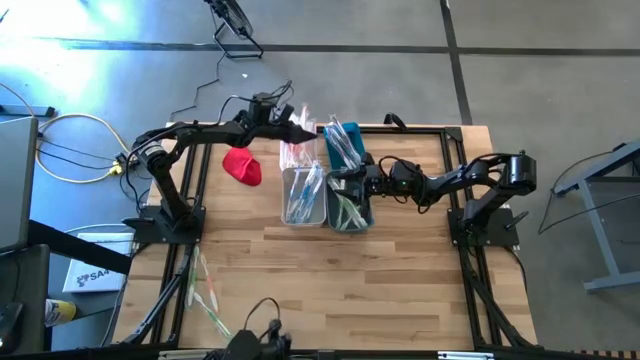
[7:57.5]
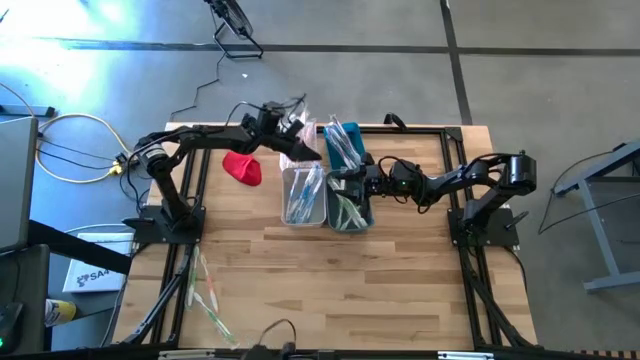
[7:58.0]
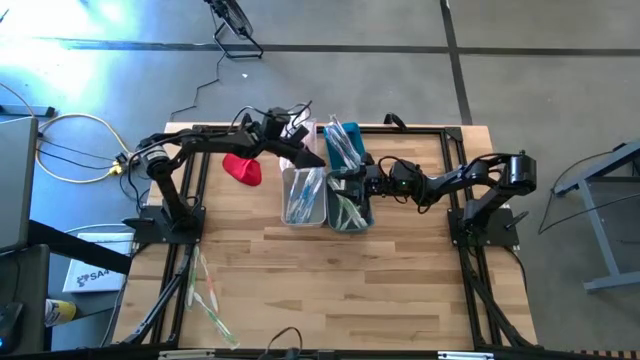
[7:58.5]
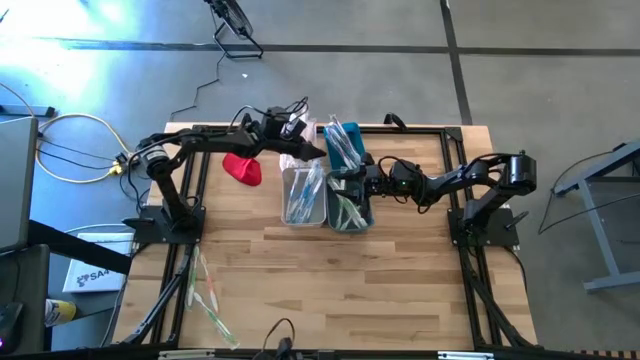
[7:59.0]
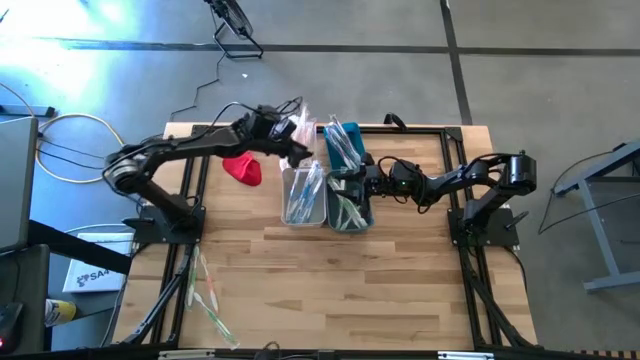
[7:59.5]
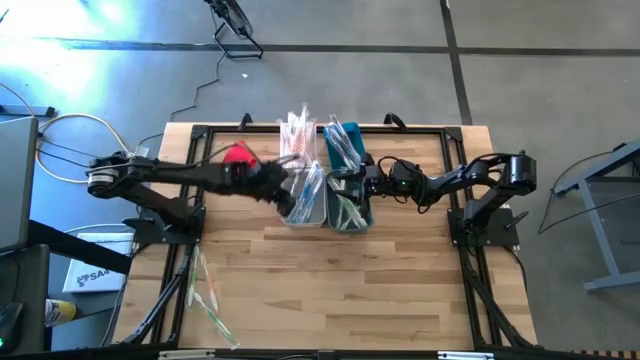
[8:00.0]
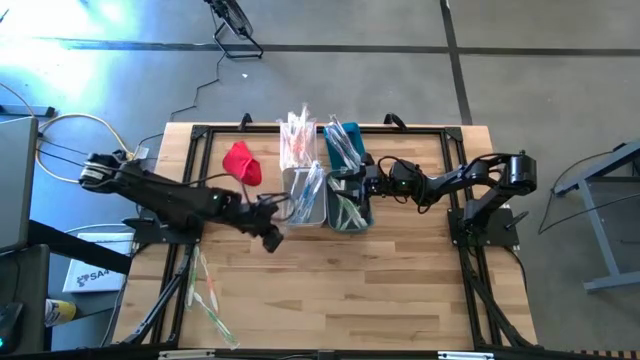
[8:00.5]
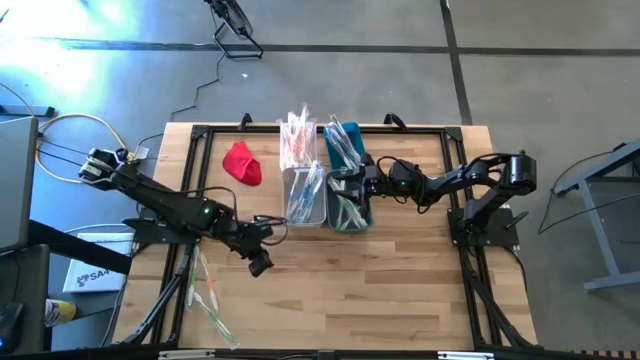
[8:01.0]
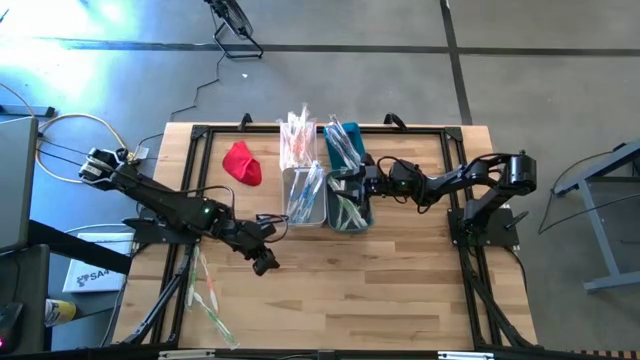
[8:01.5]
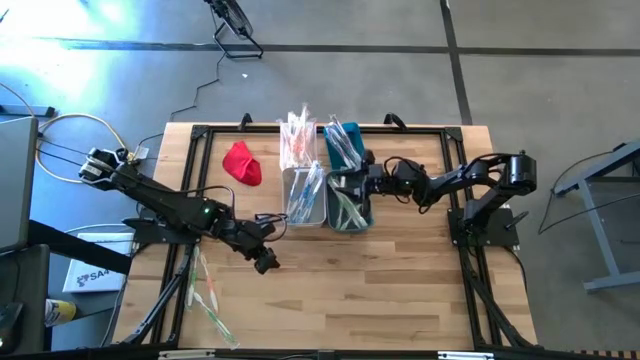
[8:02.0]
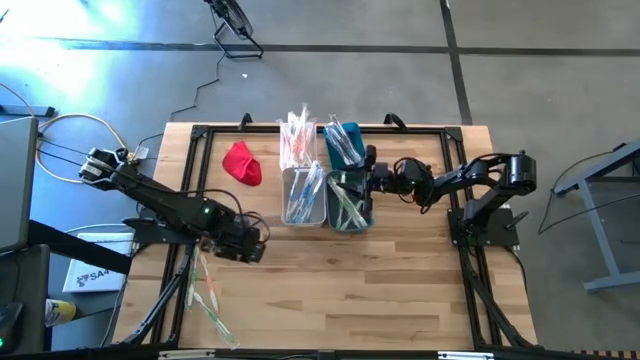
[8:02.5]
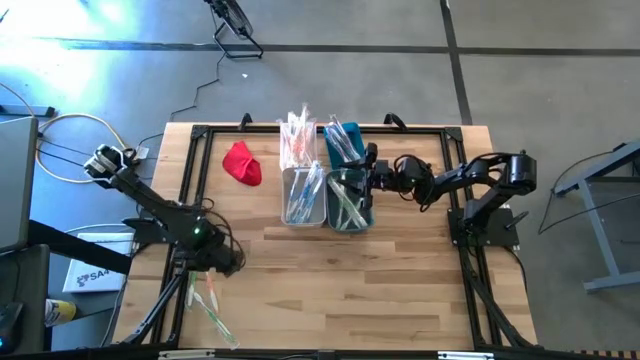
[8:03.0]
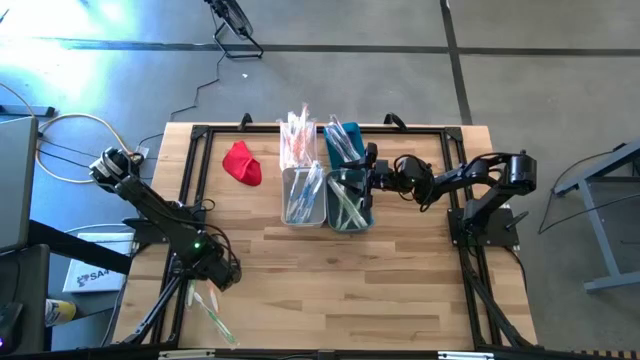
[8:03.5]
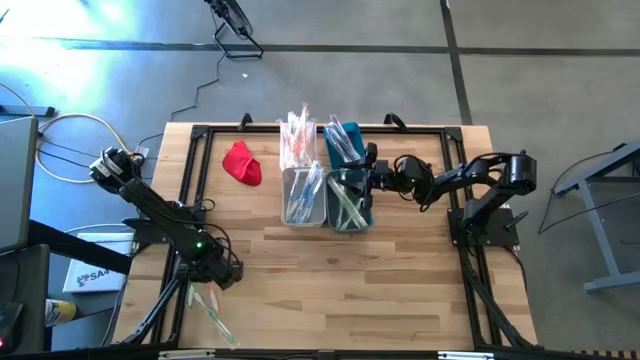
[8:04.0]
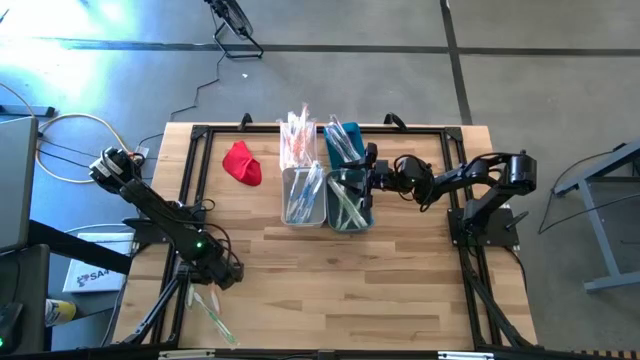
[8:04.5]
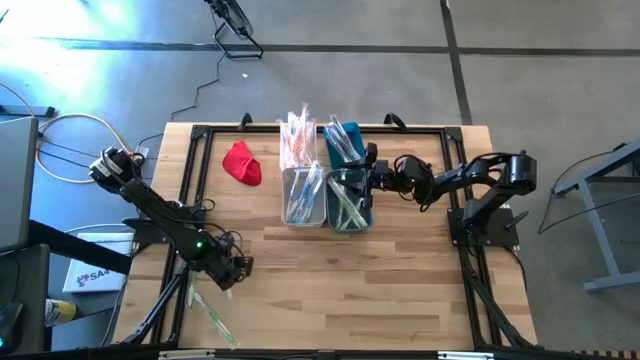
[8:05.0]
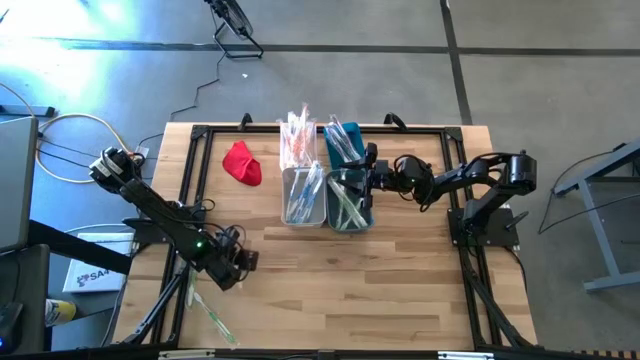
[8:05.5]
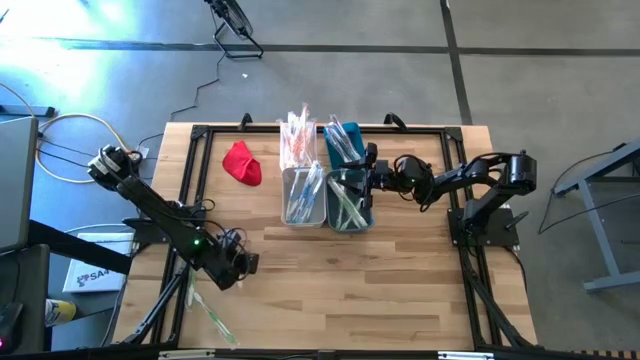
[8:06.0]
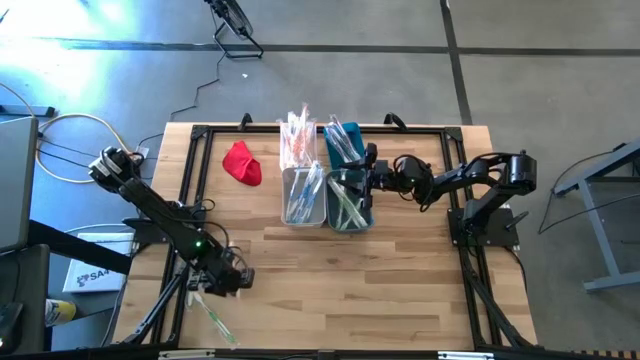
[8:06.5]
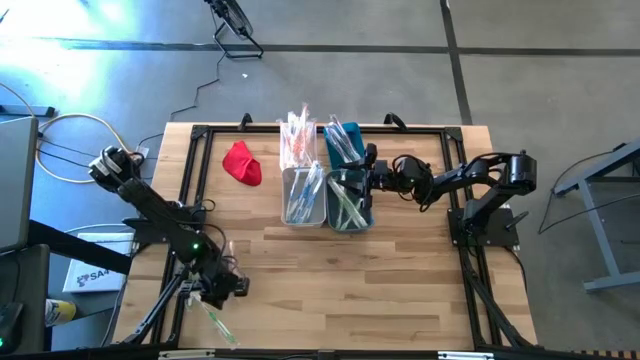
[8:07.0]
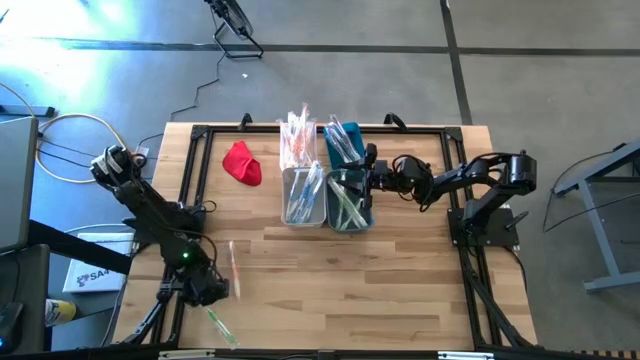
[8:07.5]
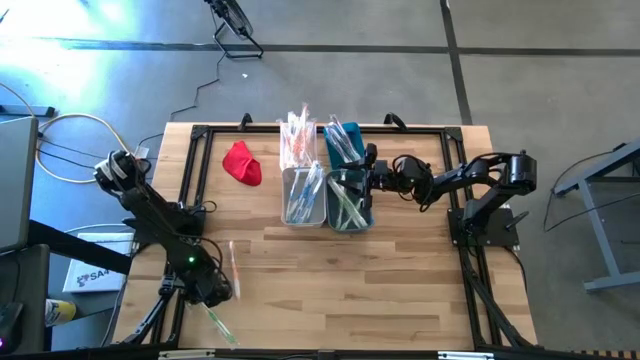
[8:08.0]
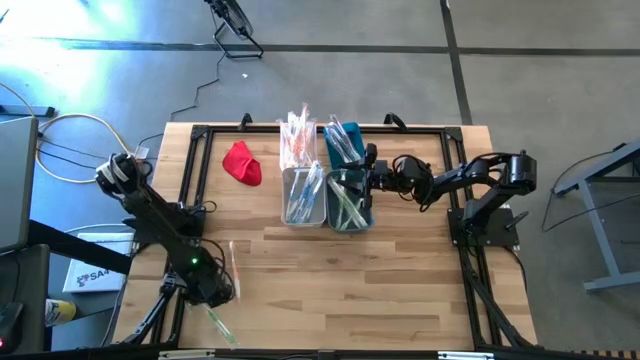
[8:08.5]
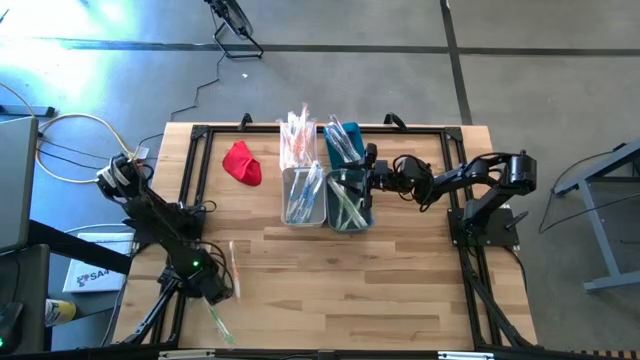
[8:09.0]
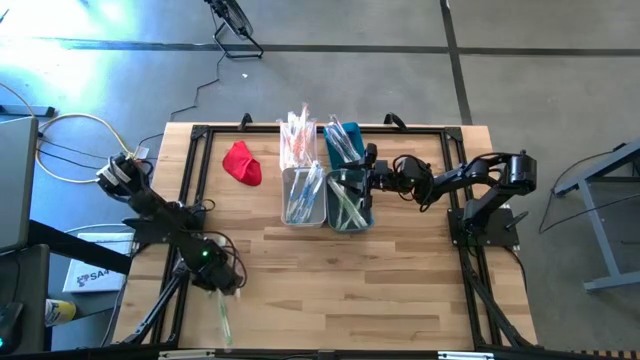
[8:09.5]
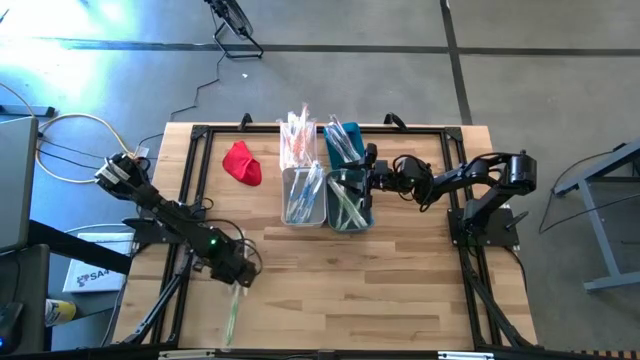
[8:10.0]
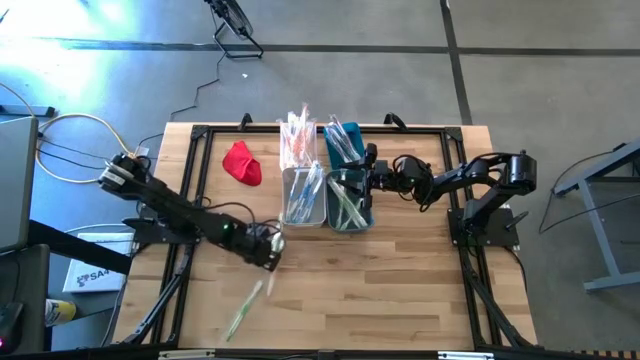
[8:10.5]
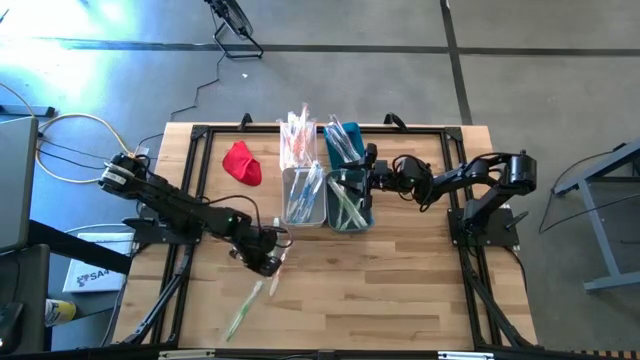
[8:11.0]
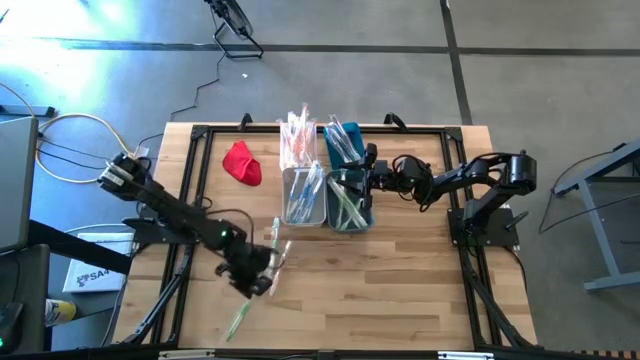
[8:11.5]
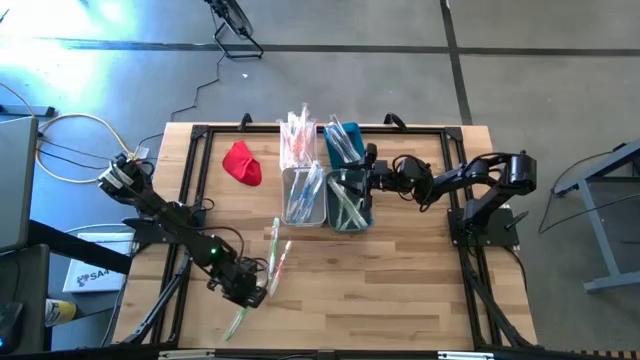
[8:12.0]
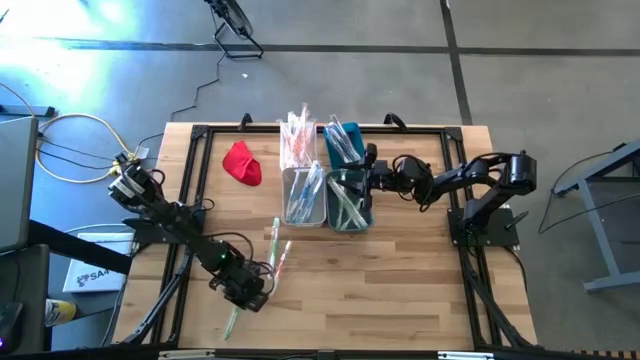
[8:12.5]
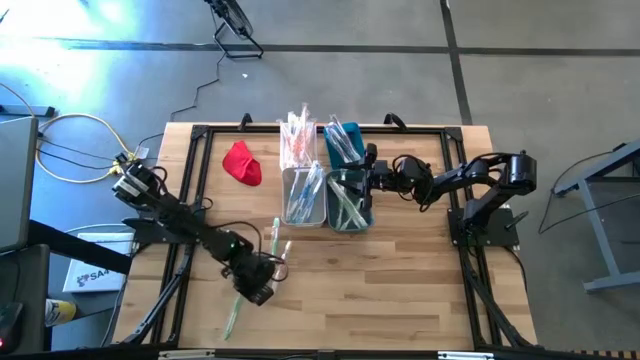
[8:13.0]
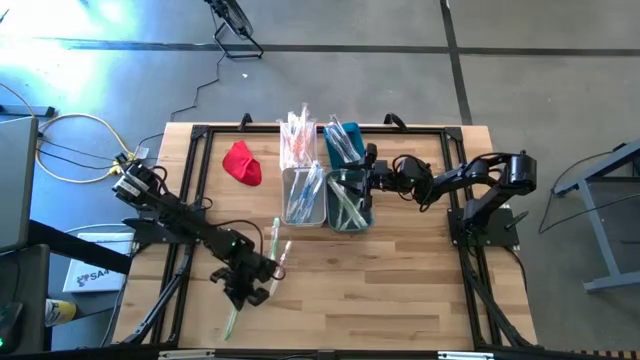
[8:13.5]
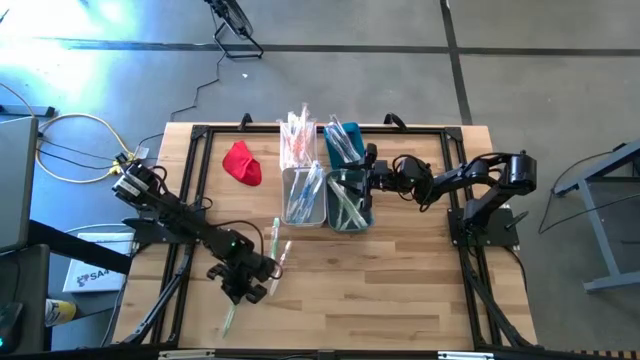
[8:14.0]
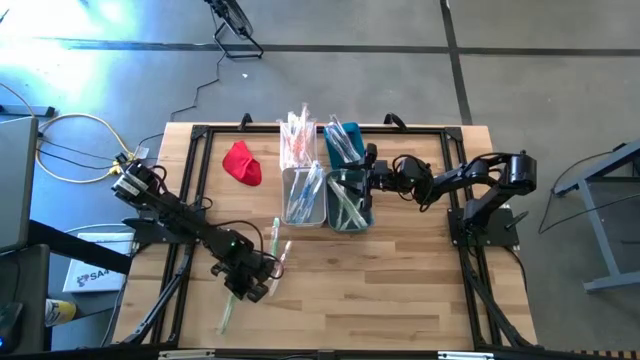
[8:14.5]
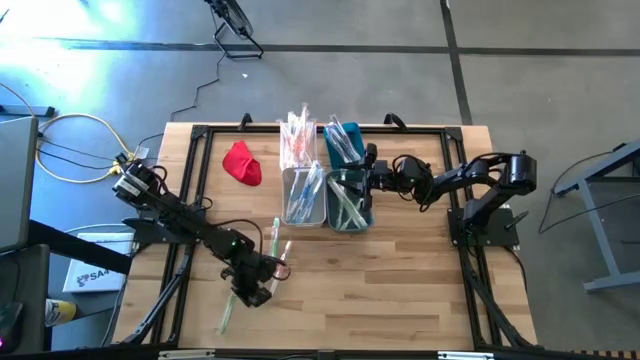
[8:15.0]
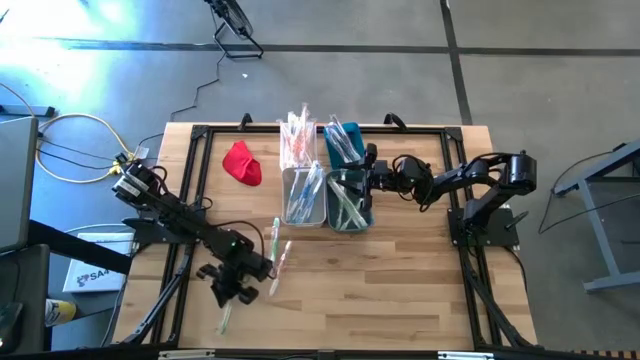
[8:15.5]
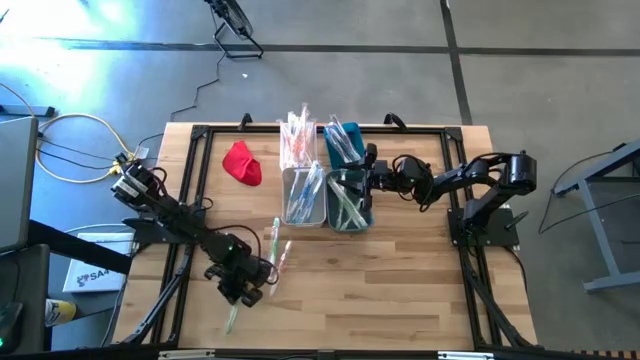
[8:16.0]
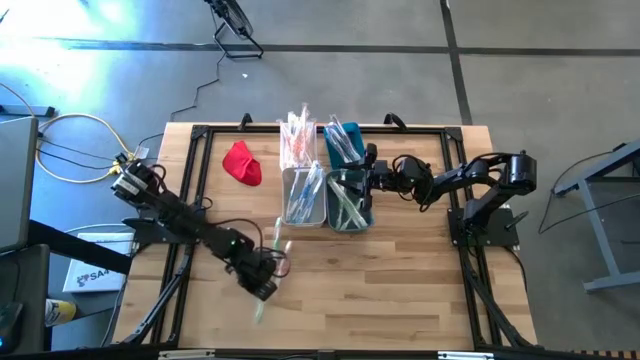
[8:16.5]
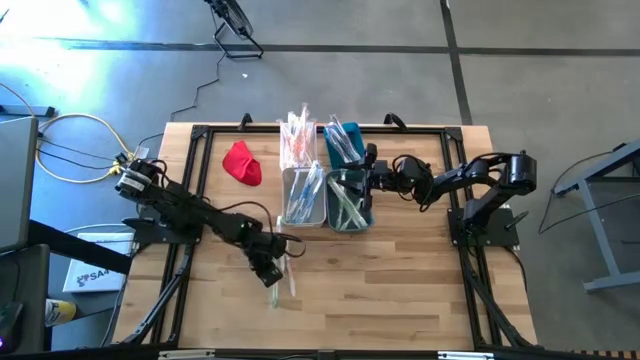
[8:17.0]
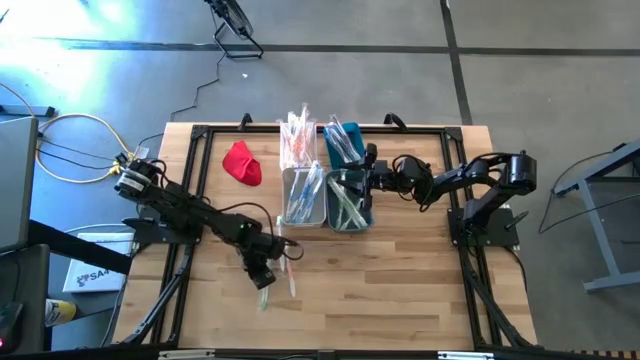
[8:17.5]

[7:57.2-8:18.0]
Task: Pick & Place Toothbrushes
Move the brushes to the middle of the table
